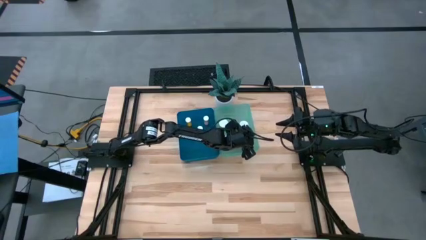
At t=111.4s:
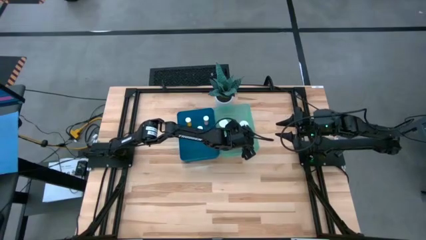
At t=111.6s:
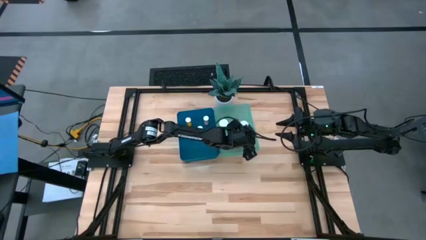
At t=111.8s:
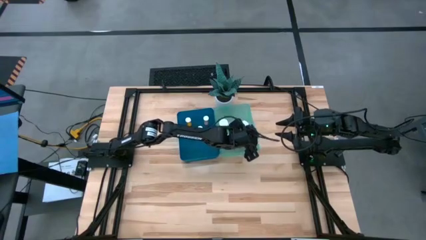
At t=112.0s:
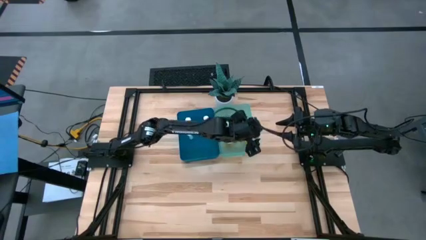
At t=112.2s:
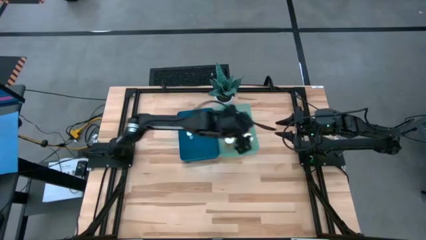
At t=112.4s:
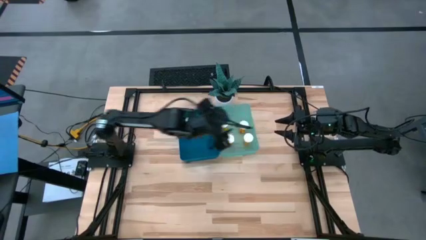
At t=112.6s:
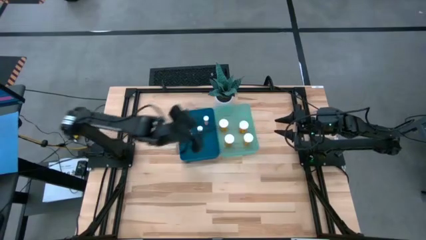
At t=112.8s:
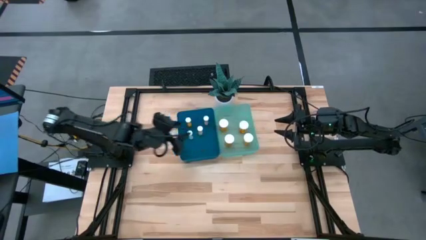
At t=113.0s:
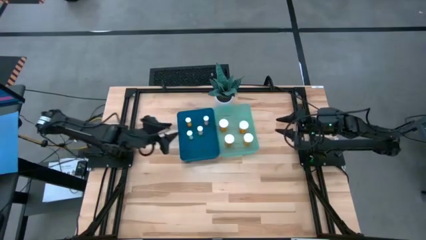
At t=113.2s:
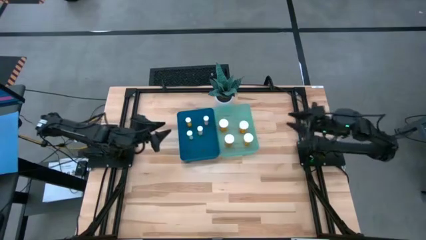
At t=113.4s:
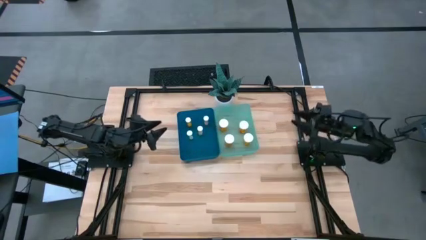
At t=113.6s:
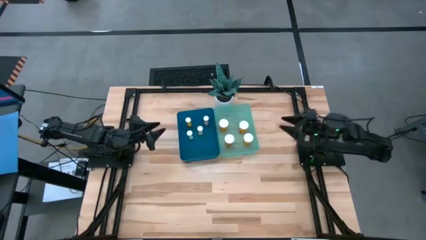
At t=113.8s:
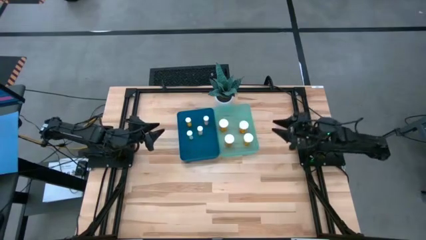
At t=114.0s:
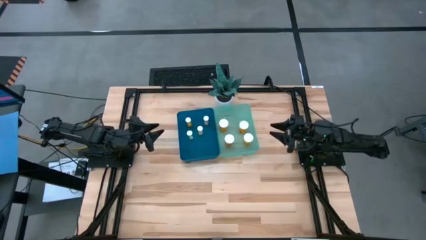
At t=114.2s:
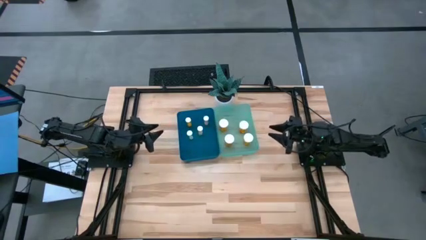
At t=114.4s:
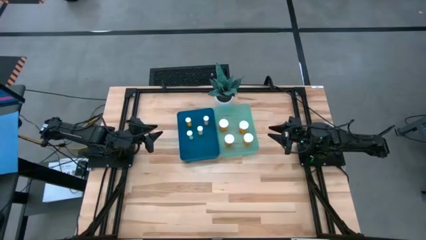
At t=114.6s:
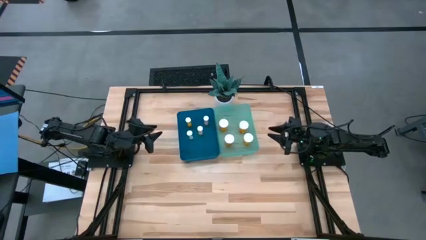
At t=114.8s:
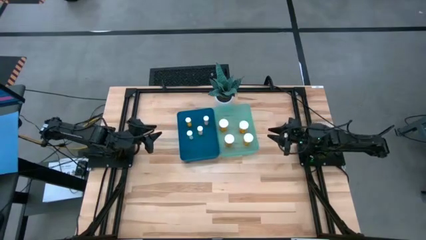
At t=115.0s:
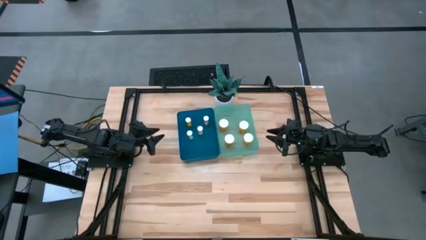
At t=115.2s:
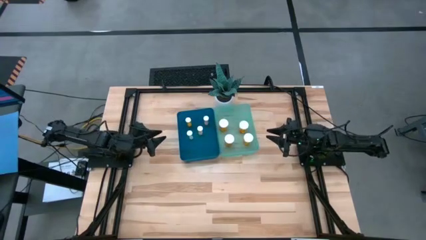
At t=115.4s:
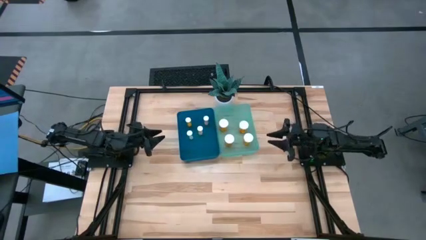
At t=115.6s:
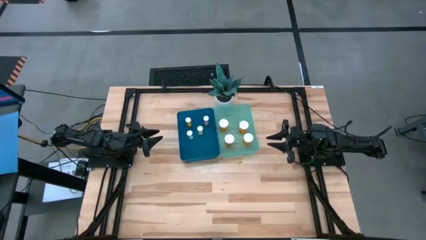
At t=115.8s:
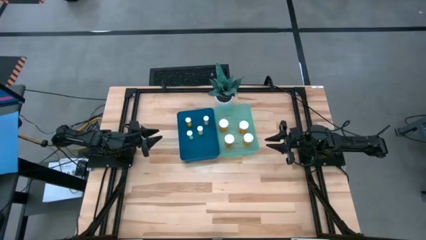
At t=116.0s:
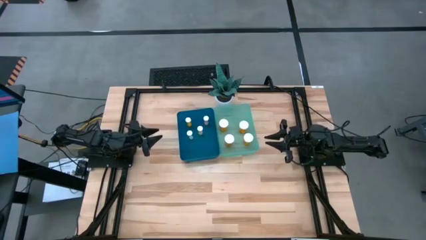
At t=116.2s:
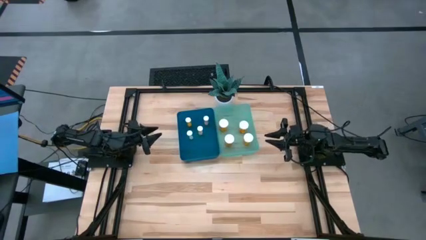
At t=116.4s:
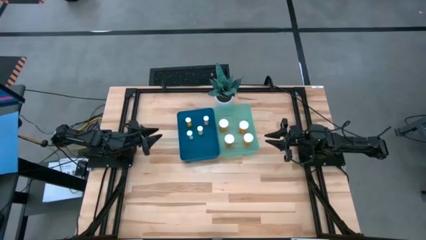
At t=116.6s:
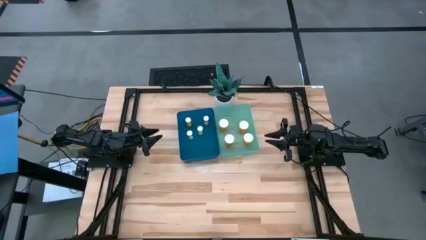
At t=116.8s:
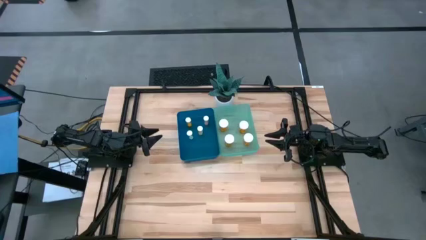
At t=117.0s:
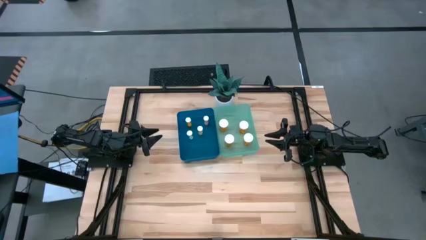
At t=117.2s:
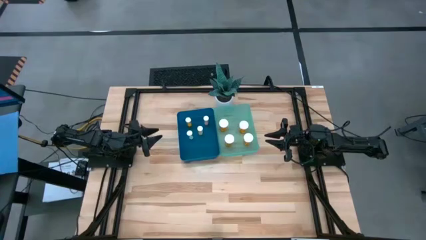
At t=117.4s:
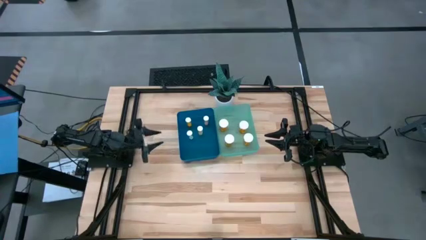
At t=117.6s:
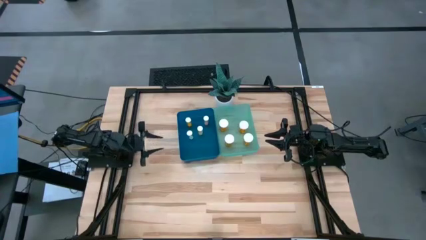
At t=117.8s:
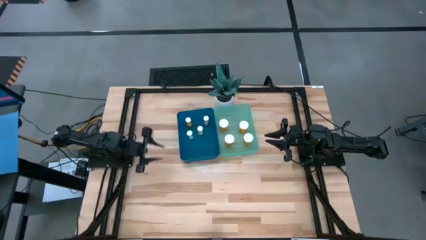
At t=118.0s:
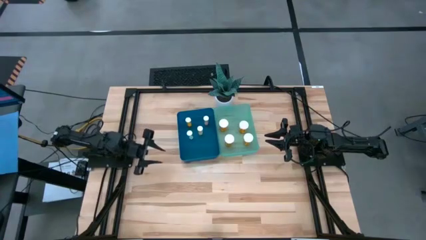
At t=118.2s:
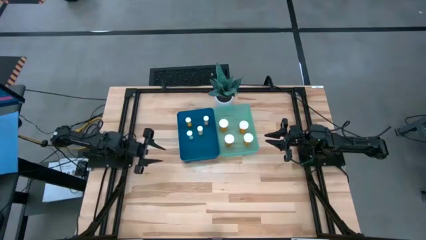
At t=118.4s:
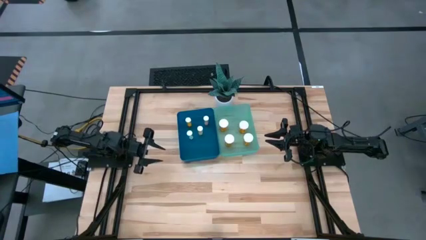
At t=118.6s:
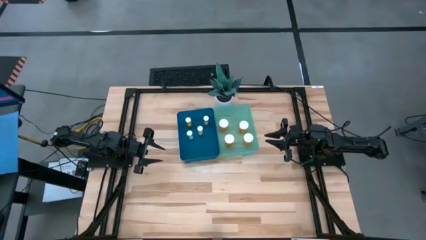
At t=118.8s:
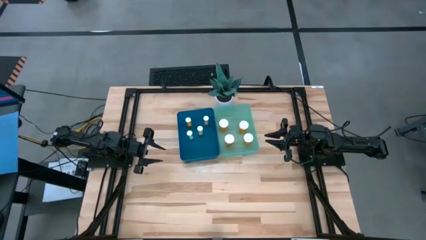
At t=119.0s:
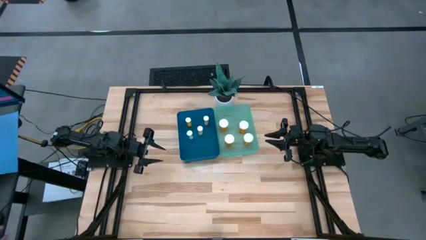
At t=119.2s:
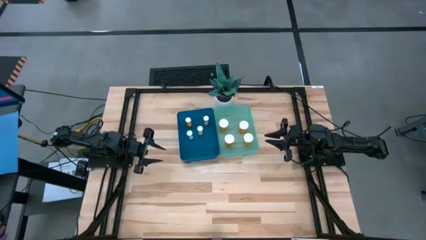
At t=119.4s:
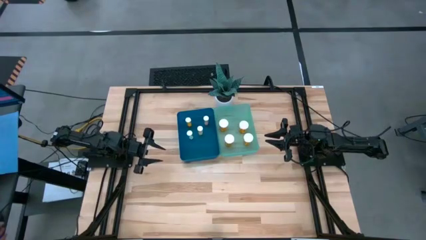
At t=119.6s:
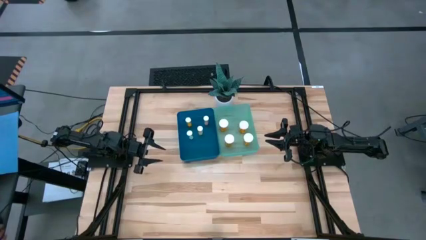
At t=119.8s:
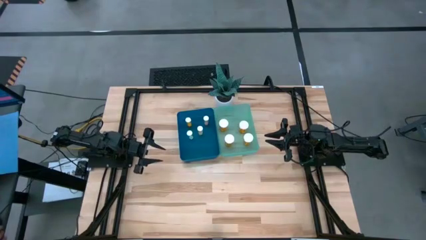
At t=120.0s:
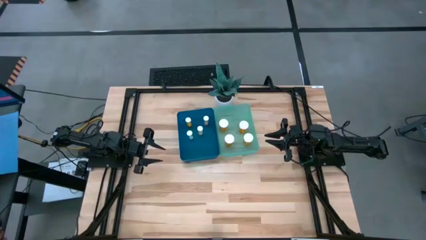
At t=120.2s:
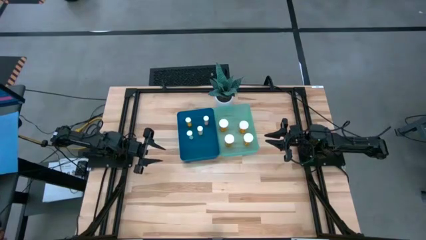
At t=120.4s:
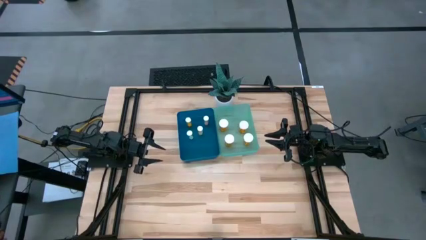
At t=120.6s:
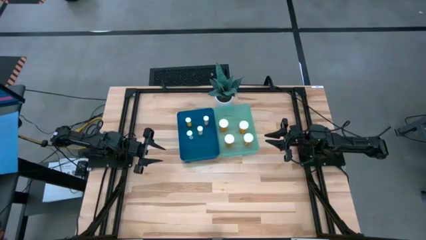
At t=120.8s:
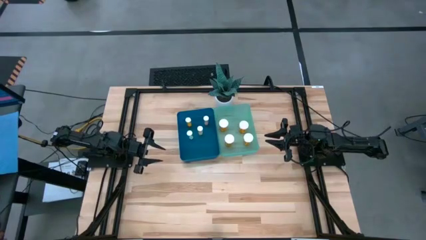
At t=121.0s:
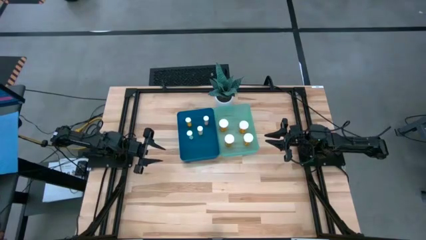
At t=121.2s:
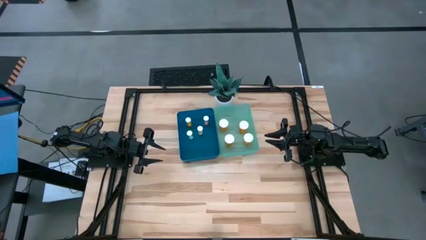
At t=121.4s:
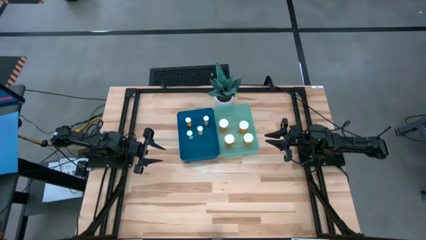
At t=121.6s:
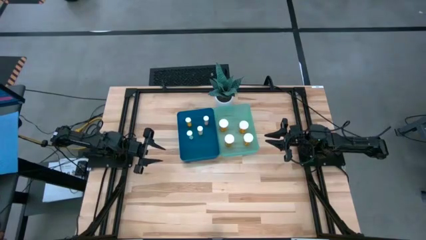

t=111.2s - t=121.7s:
Task: Pick and place medicine bottles into bin by pill shape (circle, oval)
Return to Home Position

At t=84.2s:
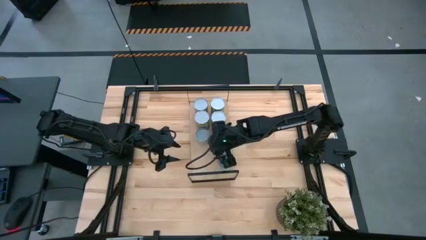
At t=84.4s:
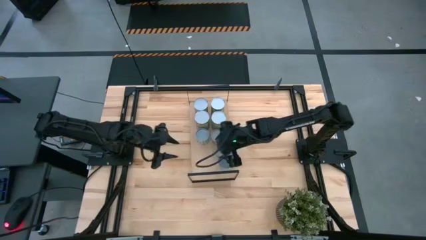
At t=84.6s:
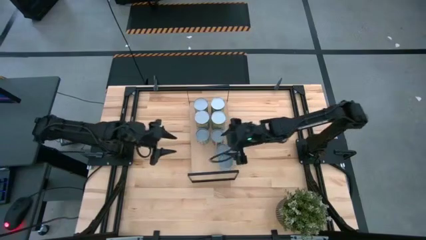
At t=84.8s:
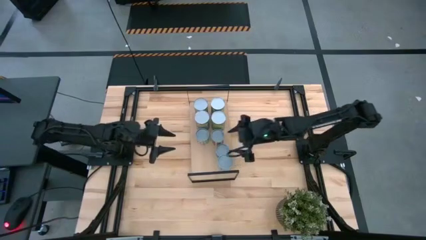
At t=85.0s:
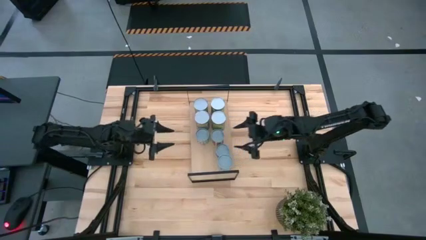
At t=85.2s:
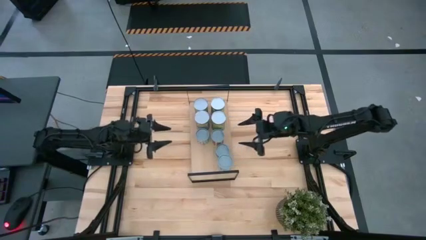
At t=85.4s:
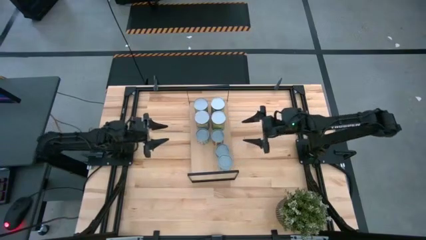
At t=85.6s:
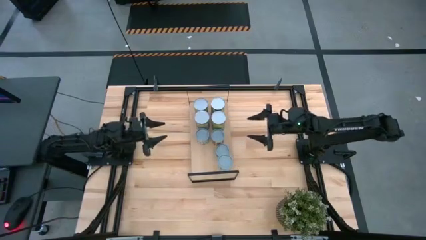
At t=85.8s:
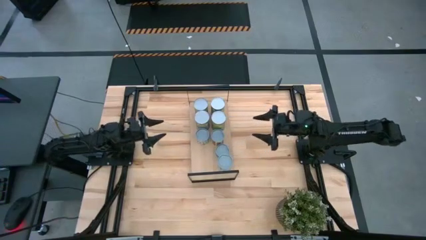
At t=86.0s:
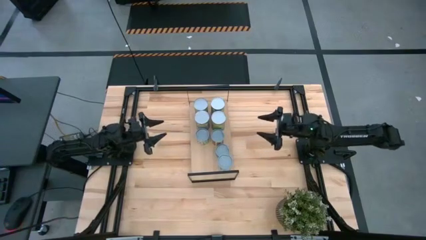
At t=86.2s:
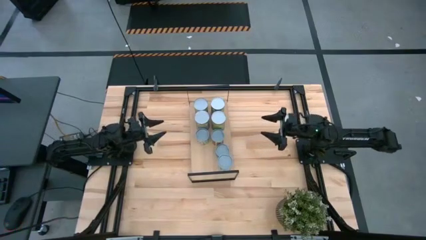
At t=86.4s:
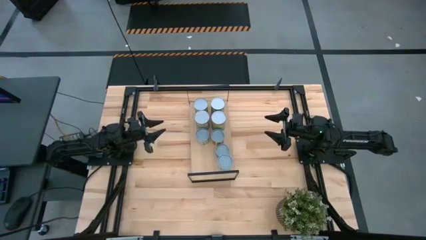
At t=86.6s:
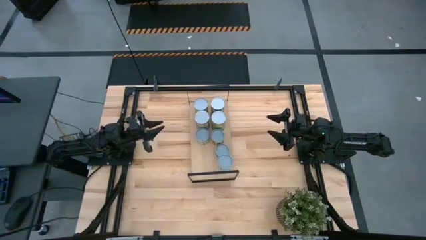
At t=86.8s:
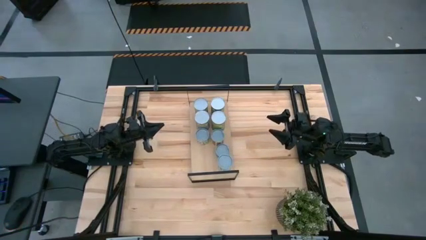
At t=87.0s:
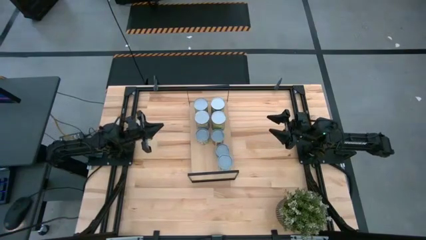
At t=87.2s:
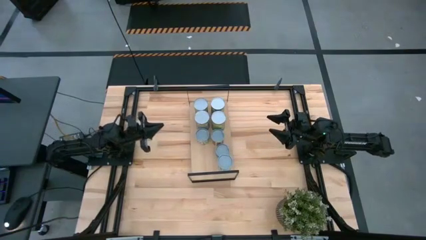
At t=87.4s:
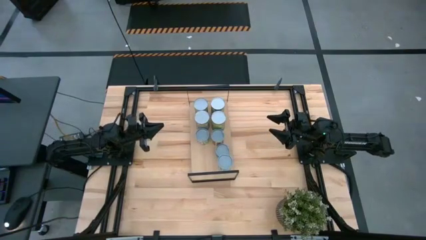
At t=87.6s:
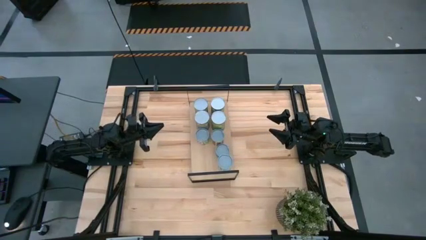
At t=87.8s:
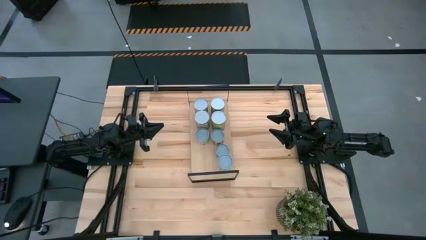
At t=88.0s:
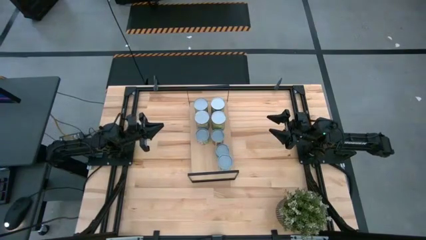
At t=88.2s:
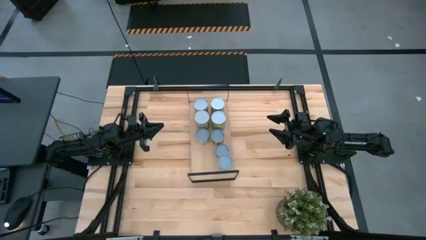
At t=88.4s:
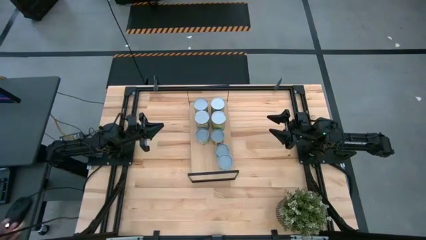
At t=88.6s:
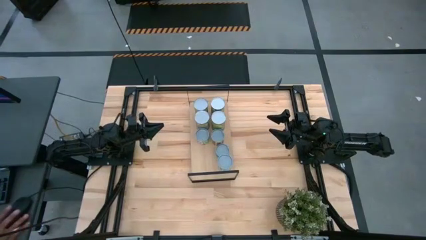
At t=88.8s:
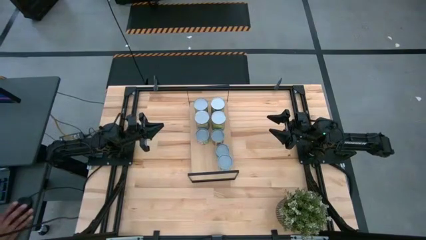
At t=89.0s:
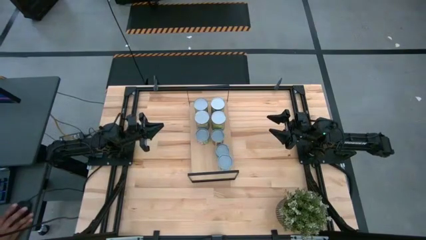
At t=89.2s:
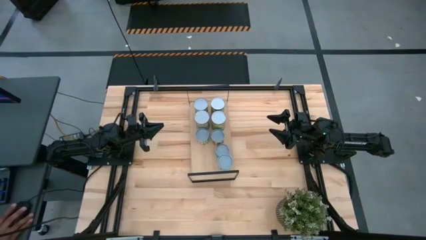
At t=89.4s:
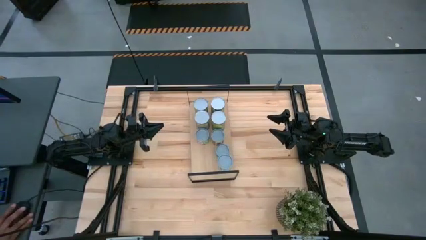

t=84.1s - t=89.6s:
Task: Pick and place cans onto a shelf
Return to Home Position
